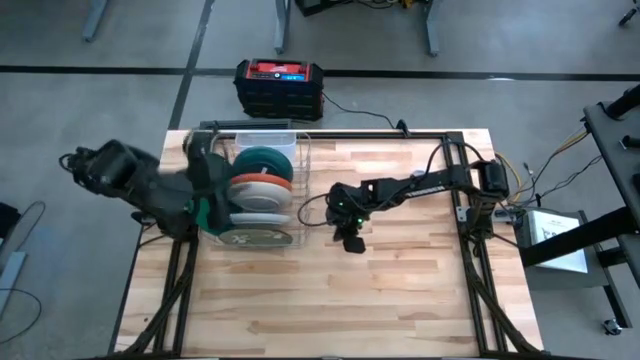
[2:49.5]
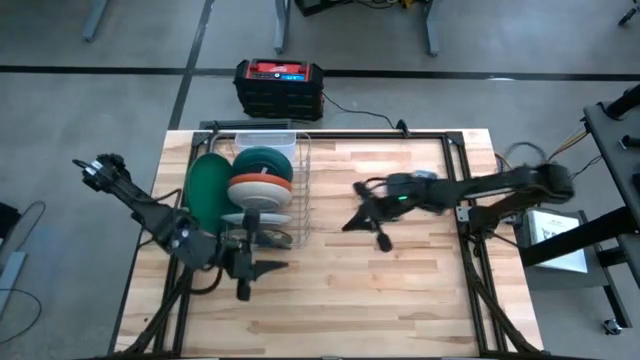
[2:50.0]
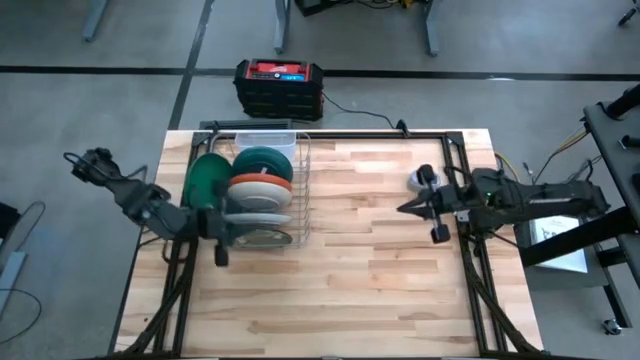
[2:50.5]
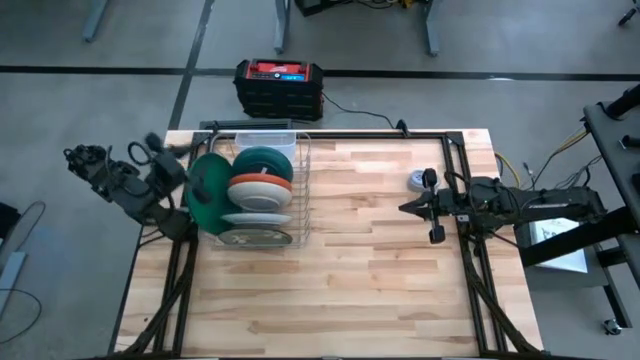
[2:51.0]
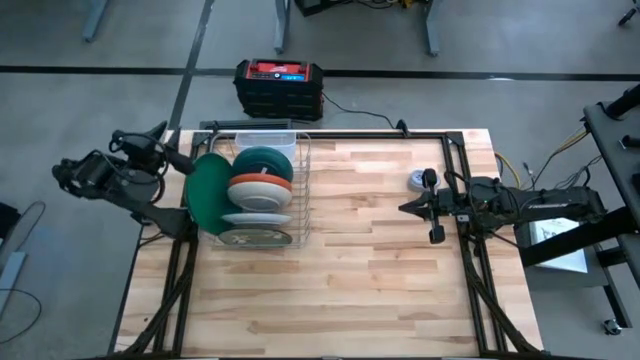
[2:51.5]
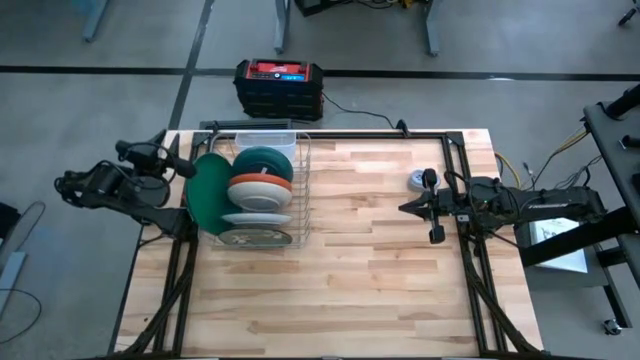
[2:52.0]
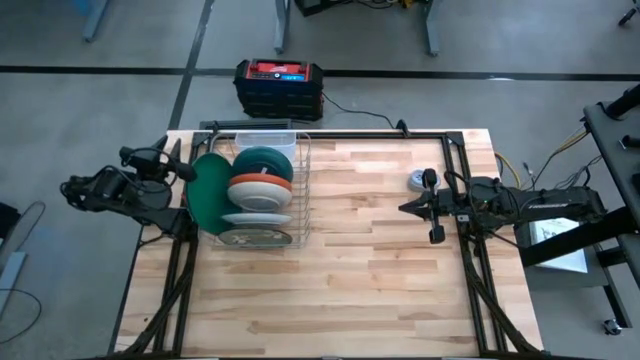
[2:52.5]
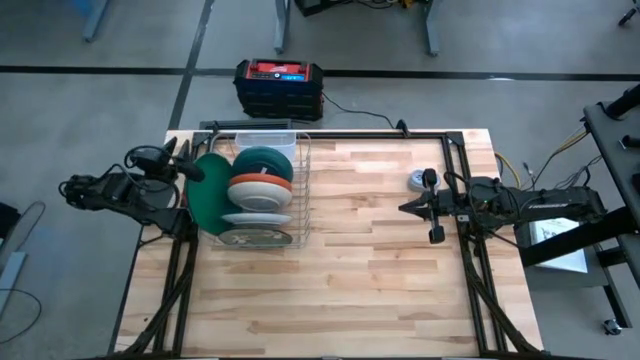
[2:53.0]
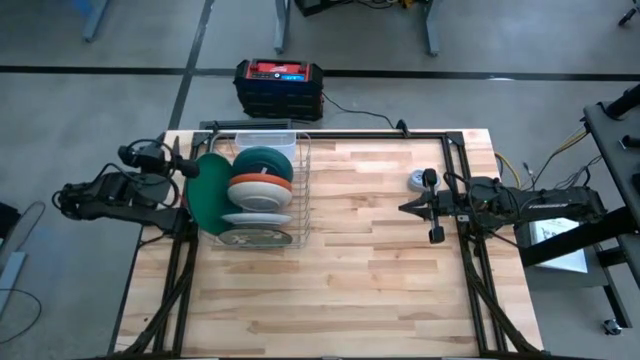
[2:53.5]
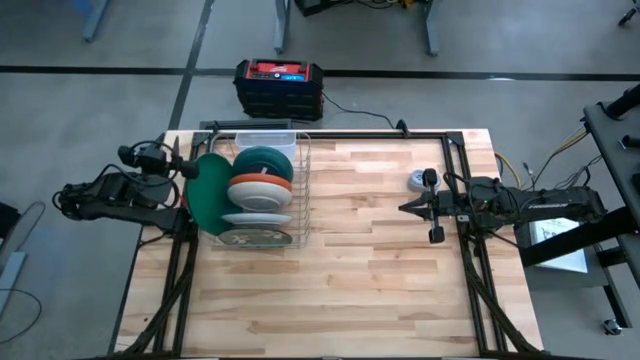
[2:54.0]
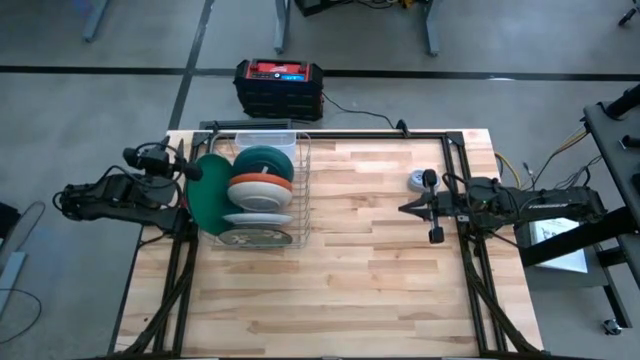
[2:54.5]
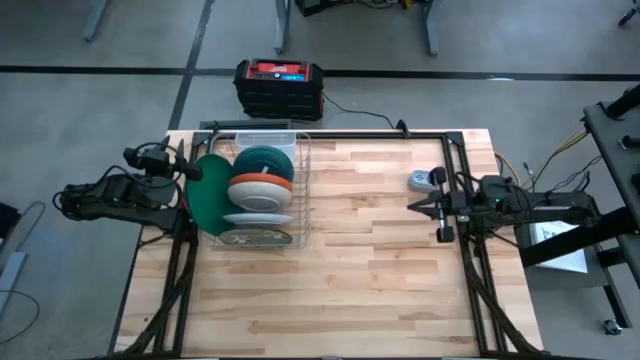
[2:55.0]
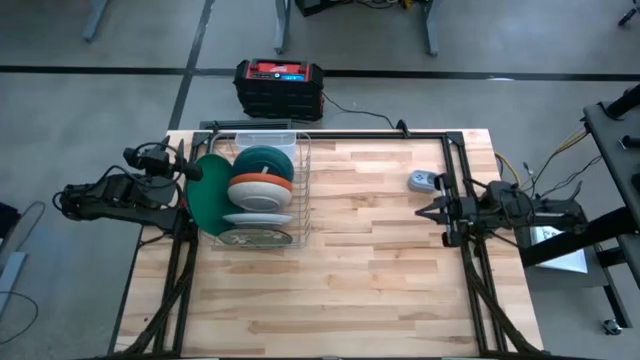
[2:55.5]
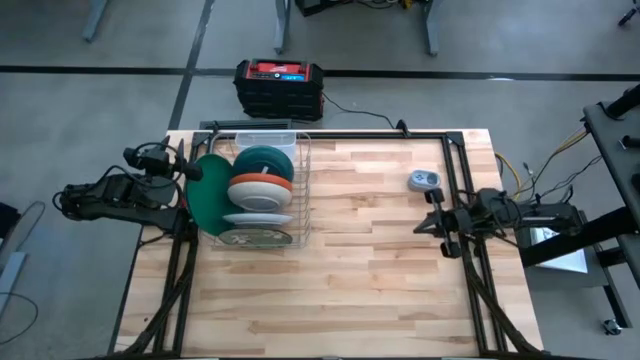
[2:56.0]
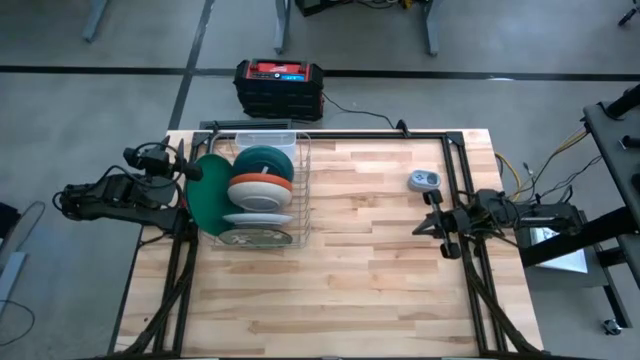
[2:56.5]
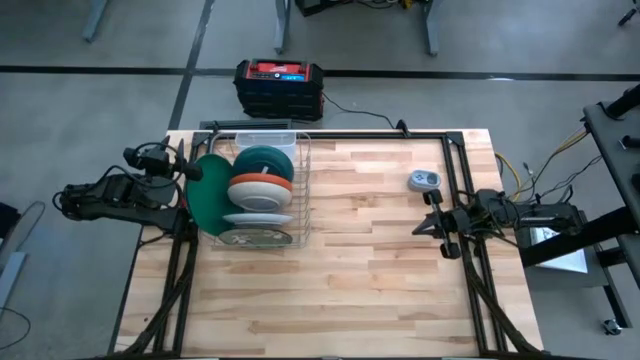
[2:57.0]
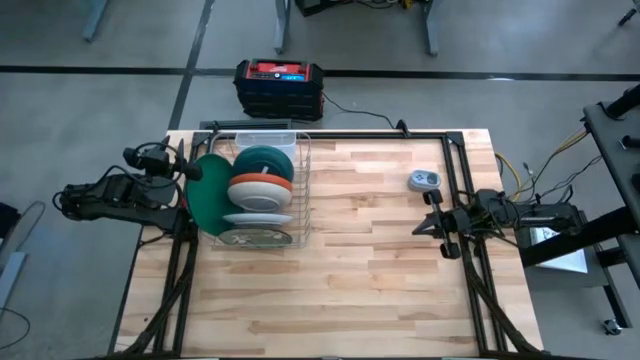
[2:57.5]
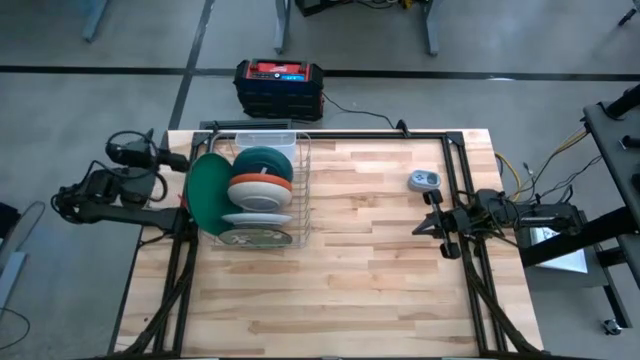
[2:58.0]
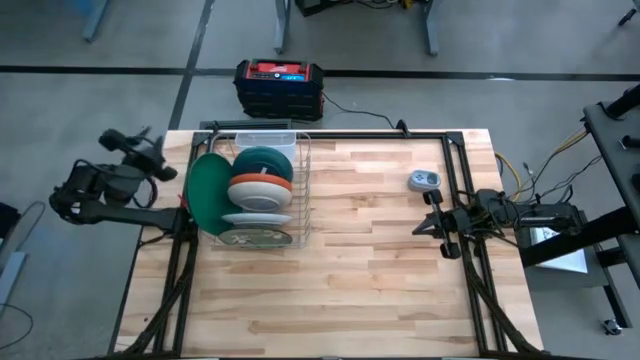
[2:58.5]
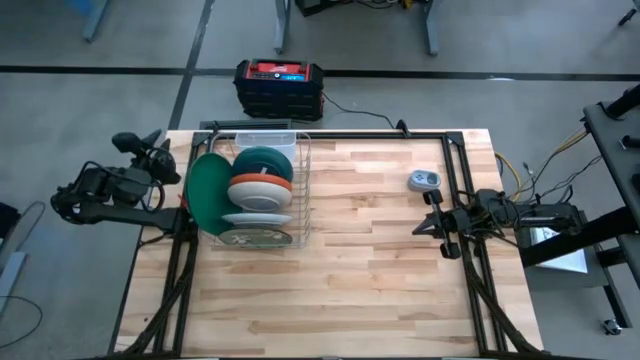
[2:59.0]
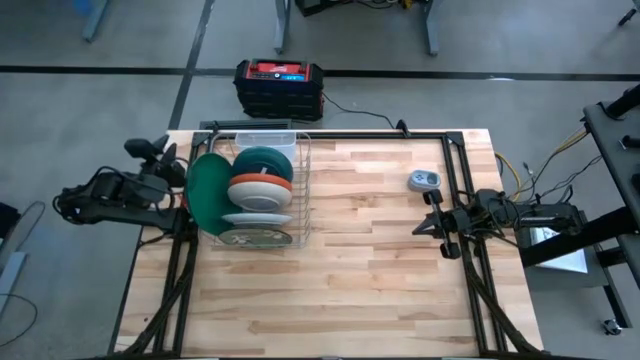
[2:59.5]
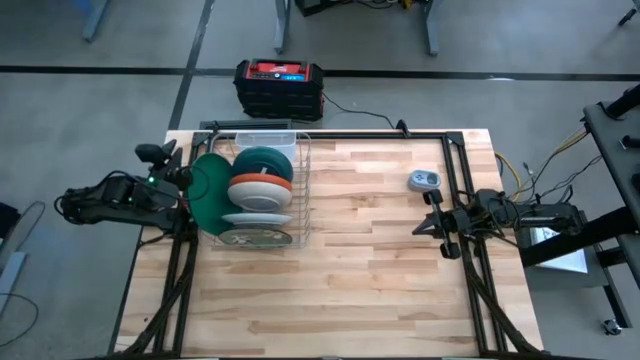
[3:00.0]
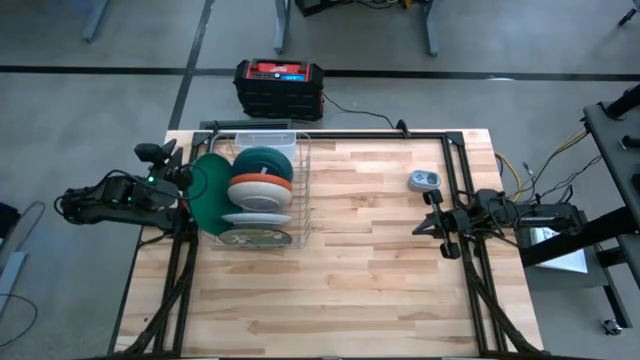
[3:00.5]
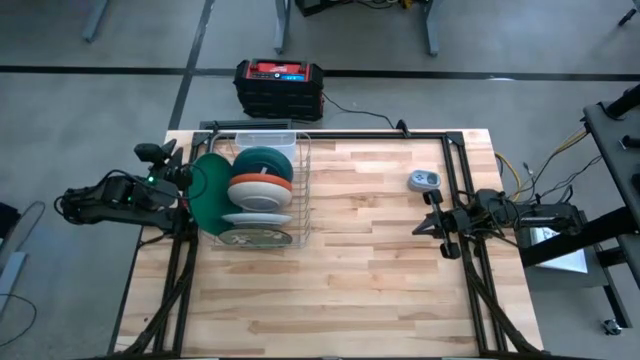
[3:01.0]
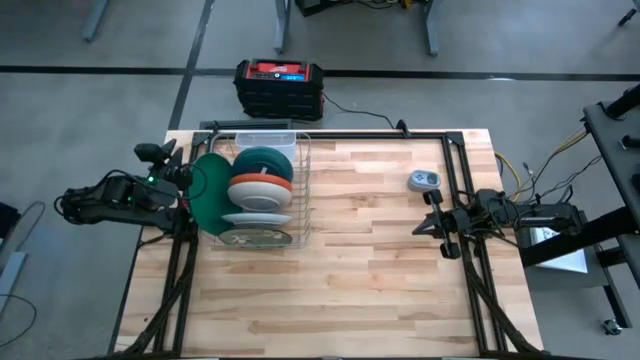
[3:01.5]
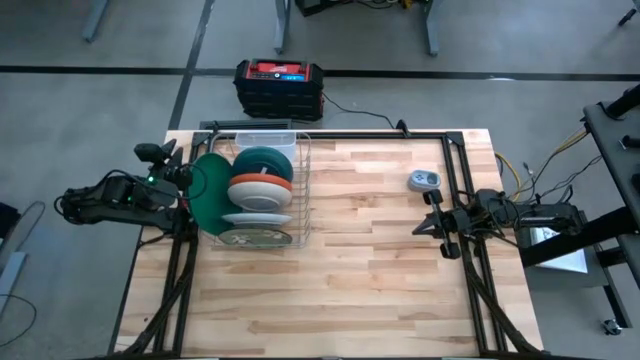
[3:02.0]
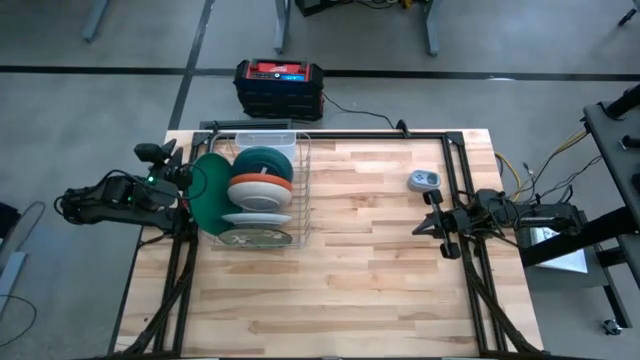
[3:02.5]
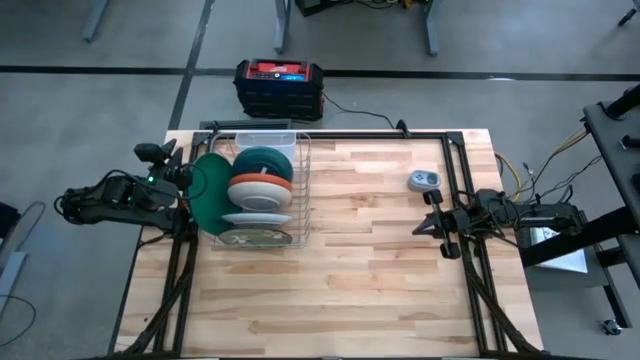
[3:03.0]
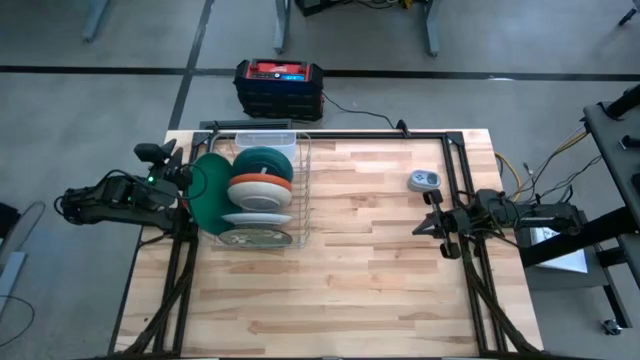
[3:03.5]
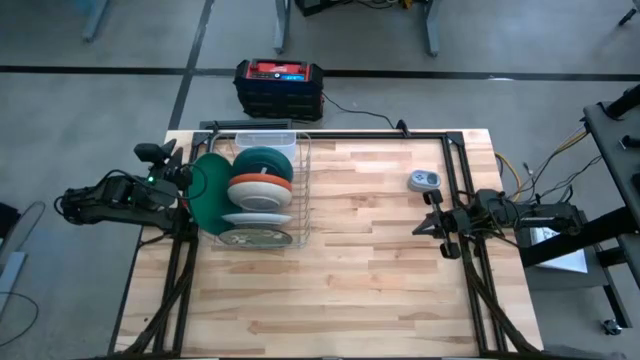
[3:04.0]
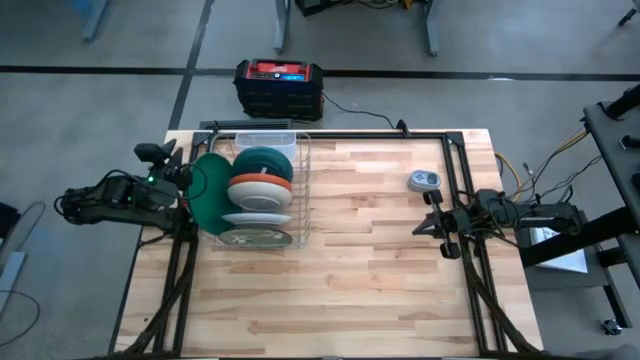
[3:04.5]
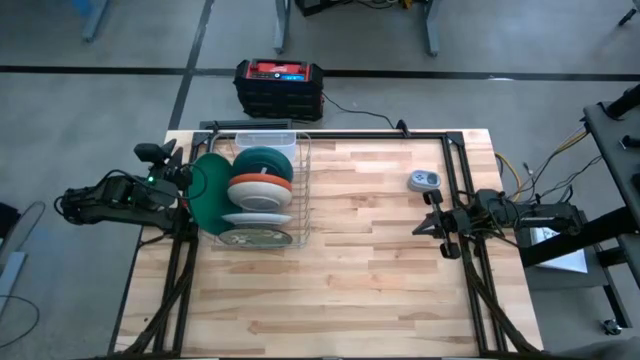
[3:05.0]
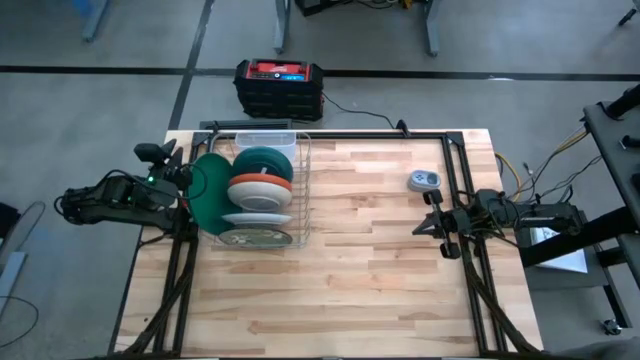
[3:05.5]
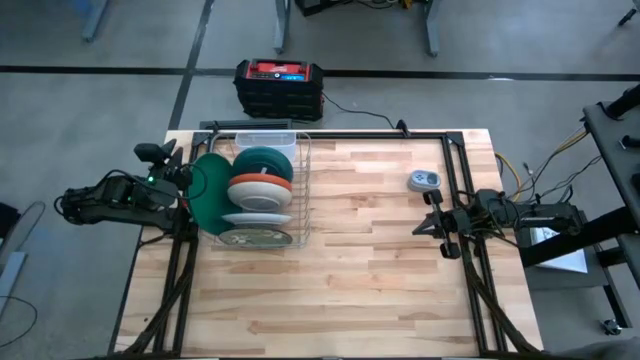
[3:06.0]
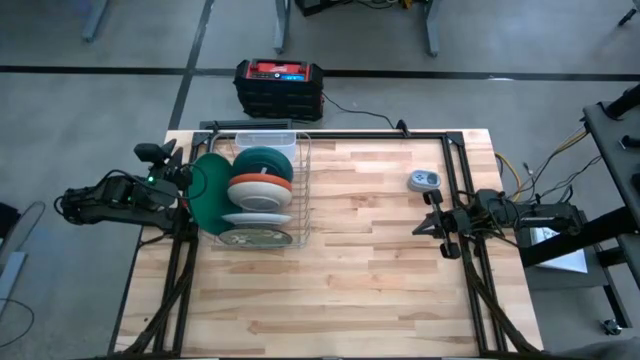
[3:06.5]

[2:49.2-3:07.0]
Task: Sort dishes
Return to Home Position

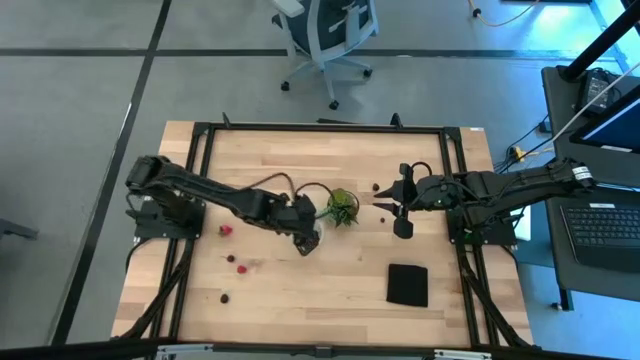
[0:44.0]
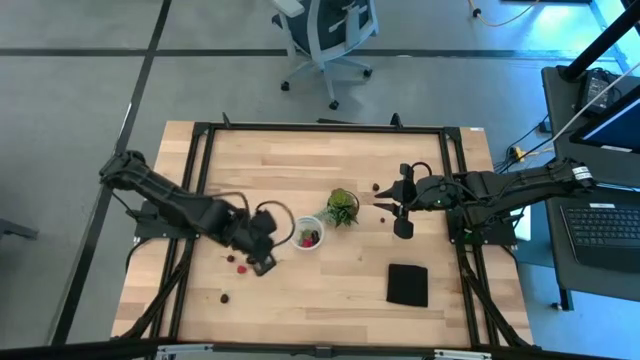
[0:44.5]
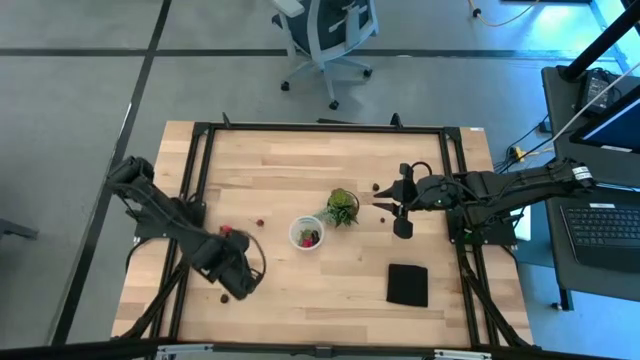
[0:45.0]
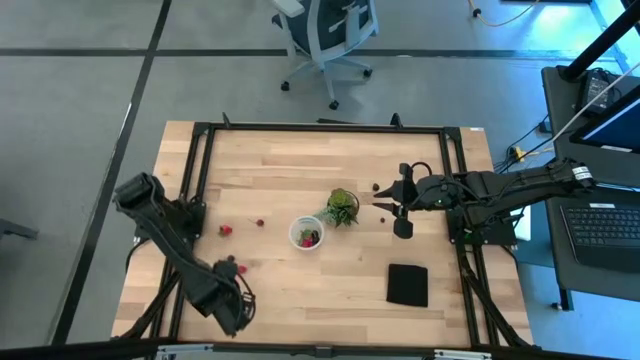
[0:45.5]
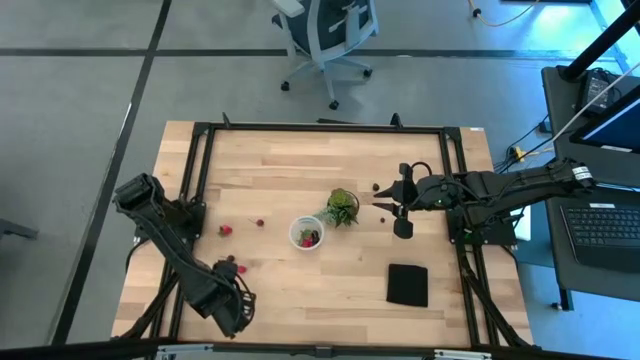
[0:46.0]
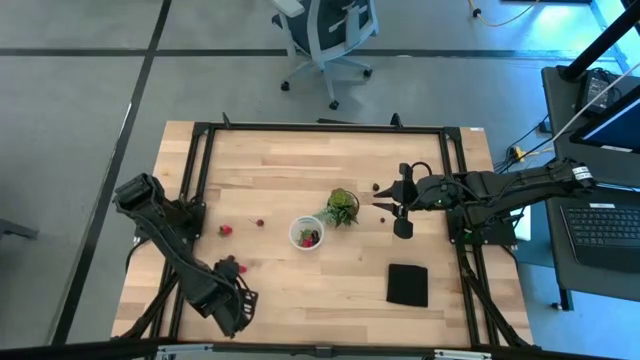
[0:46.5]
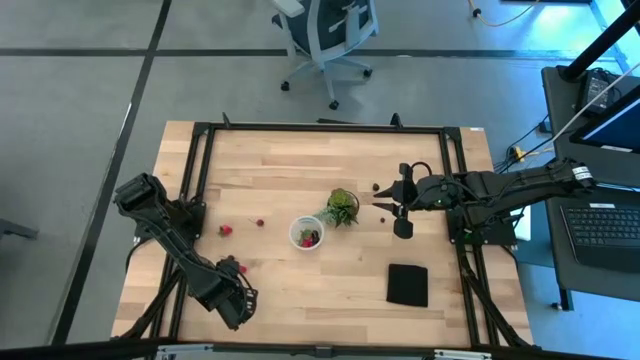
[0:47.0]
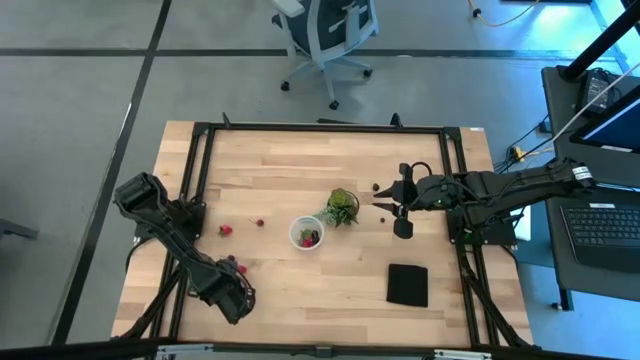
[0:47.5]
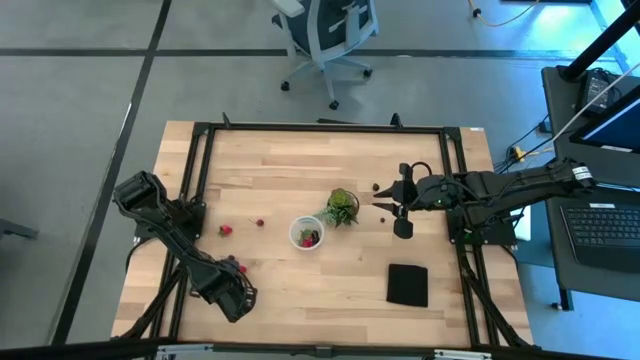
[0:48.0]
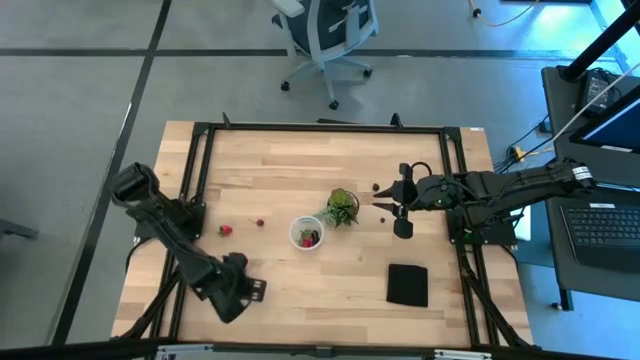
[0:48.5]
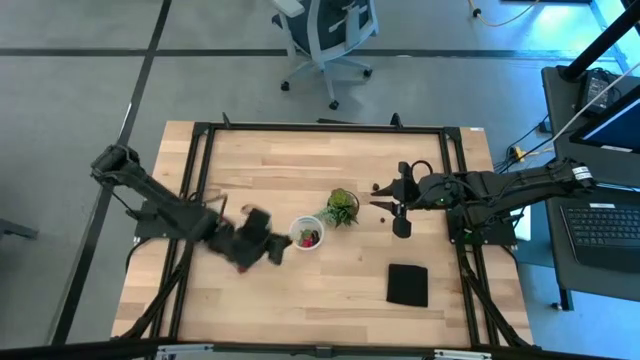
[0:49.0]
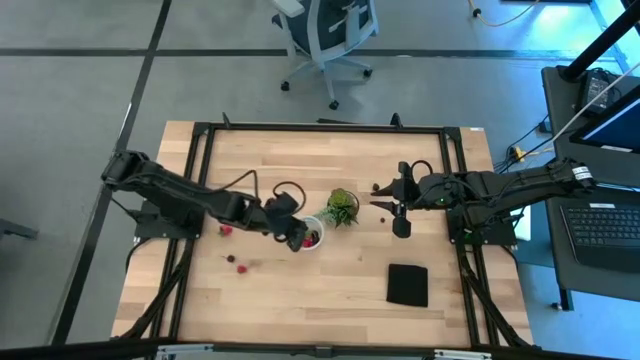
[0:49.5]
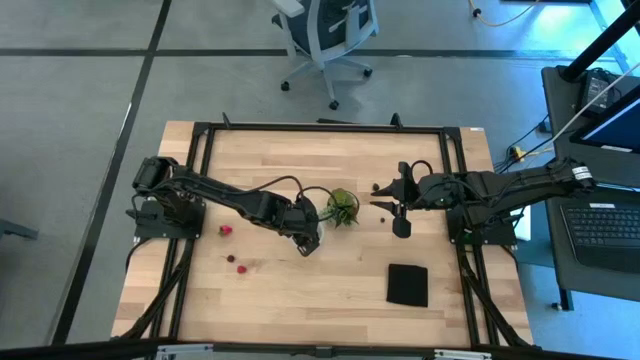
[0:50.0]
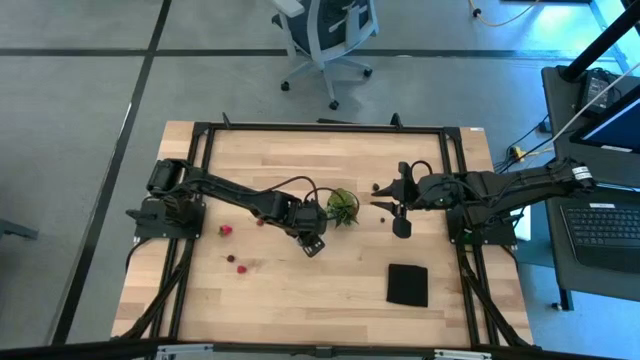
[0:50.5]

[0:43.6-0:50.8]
Task: Pick and placing Produce into tupperware
Put the bottom blackberry into the transparent container
